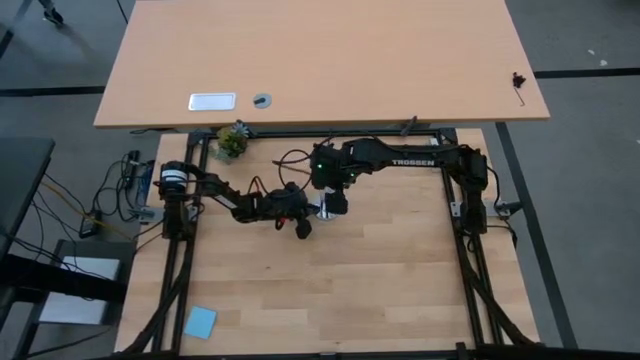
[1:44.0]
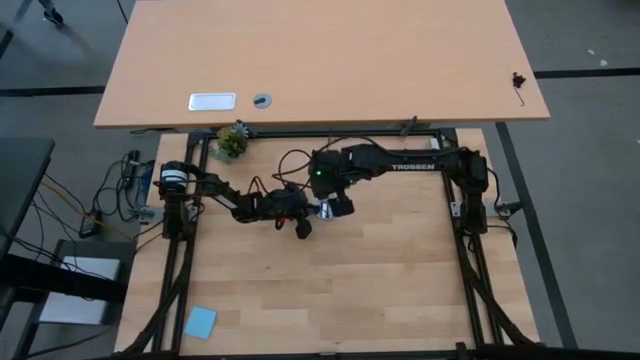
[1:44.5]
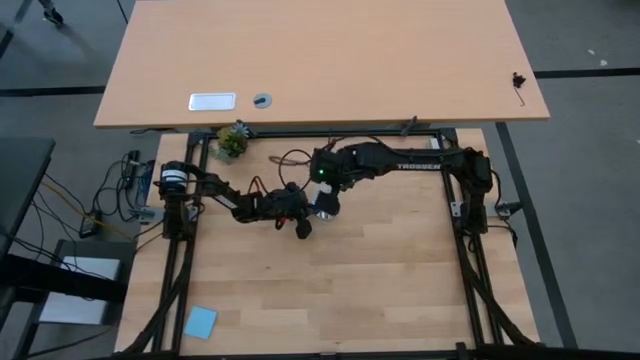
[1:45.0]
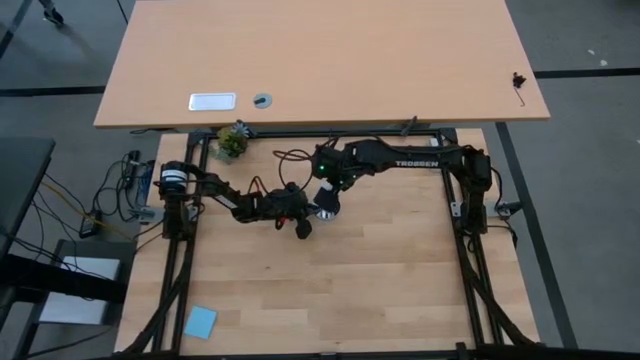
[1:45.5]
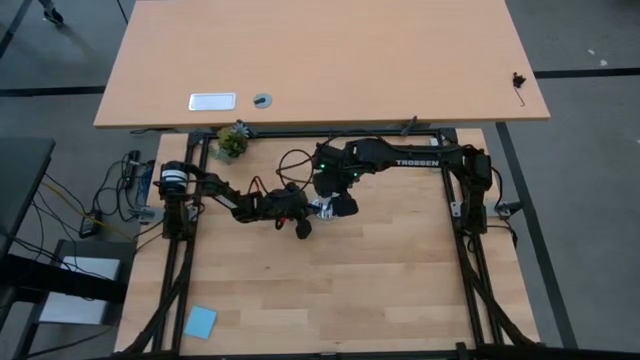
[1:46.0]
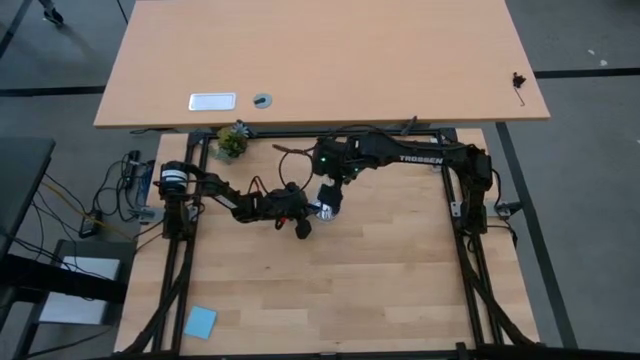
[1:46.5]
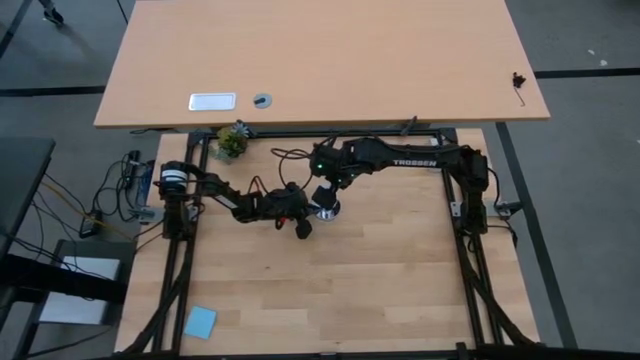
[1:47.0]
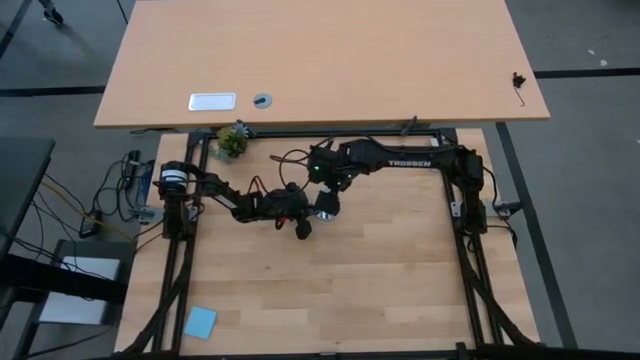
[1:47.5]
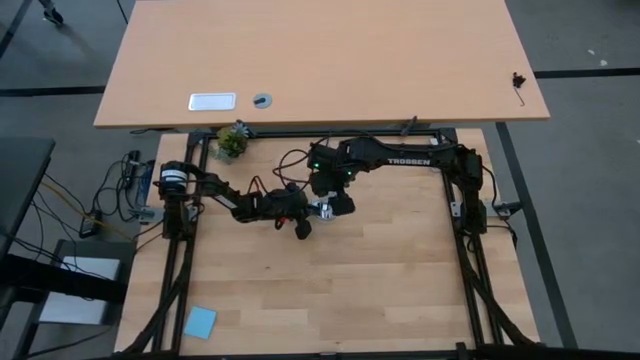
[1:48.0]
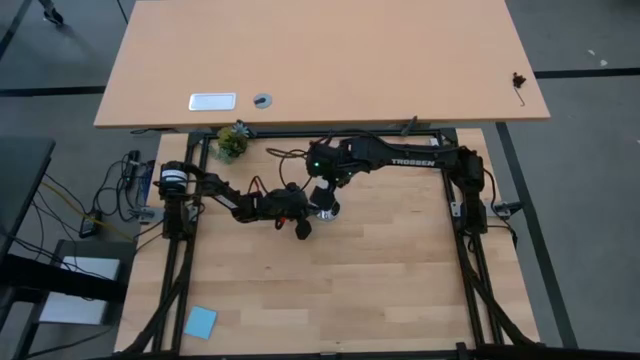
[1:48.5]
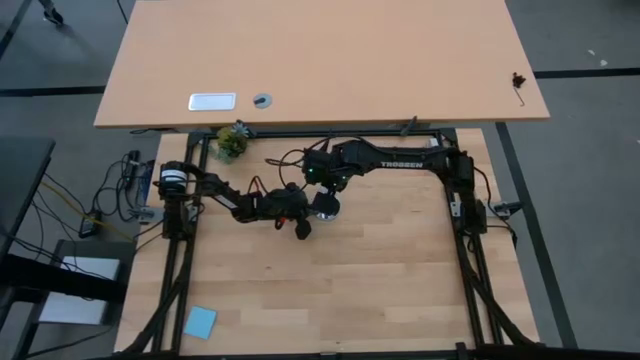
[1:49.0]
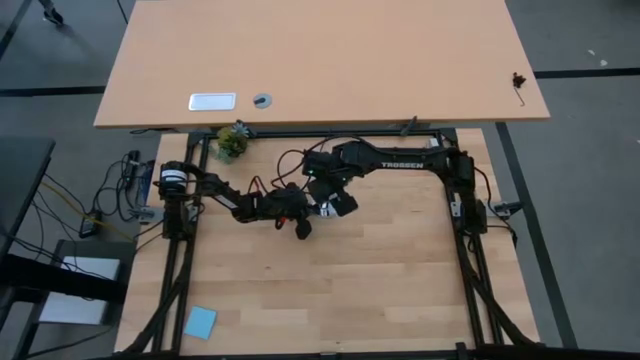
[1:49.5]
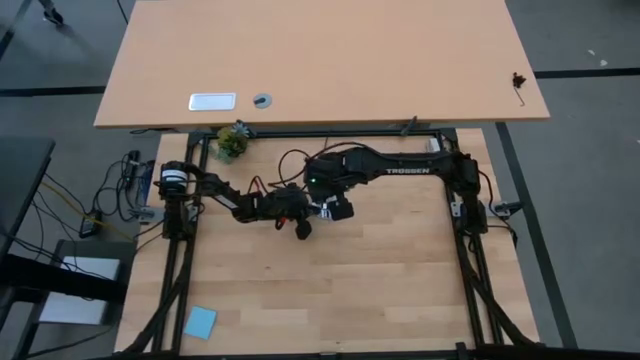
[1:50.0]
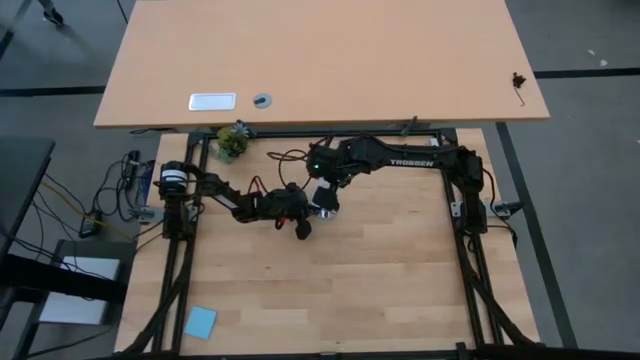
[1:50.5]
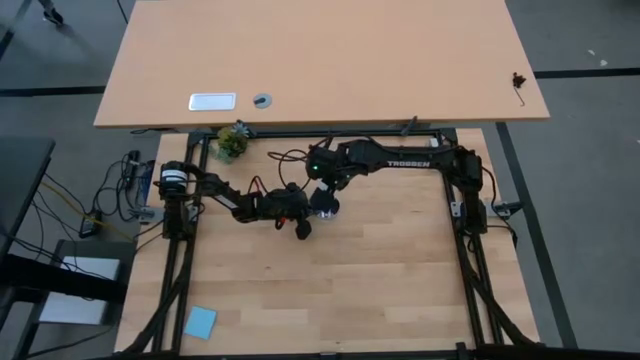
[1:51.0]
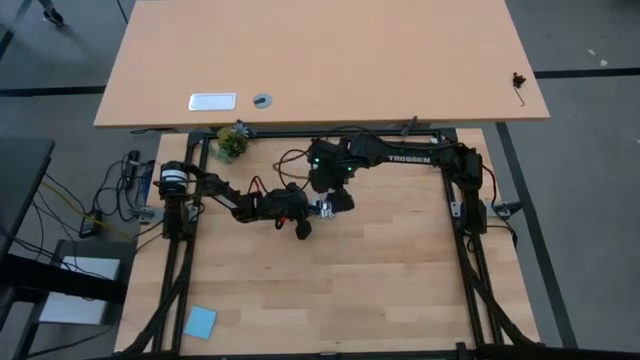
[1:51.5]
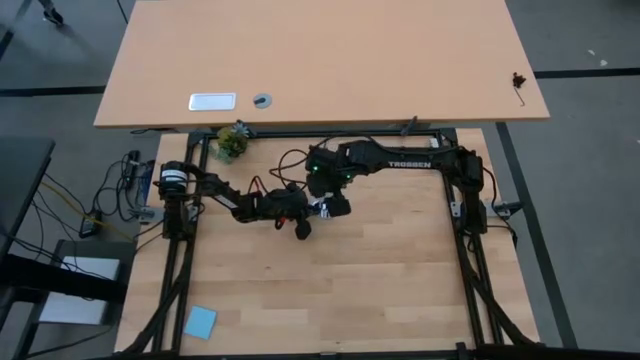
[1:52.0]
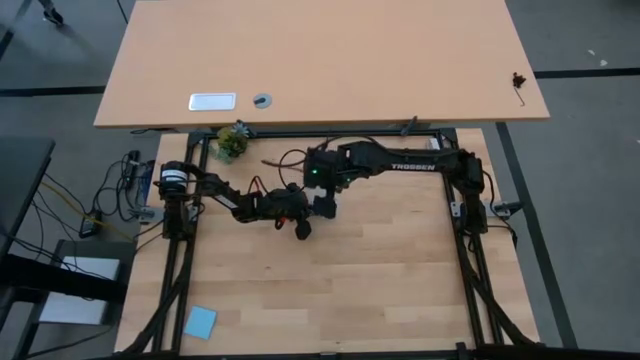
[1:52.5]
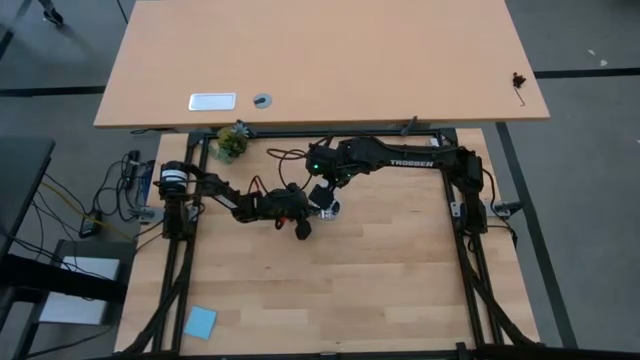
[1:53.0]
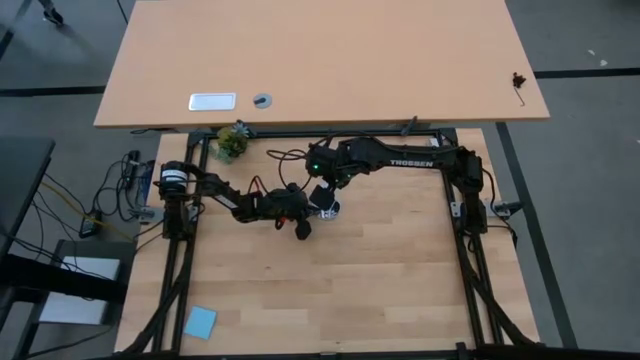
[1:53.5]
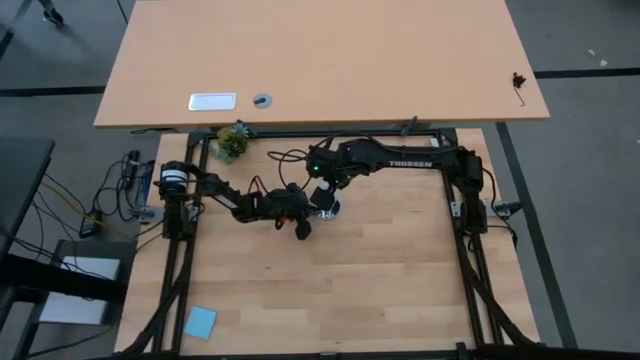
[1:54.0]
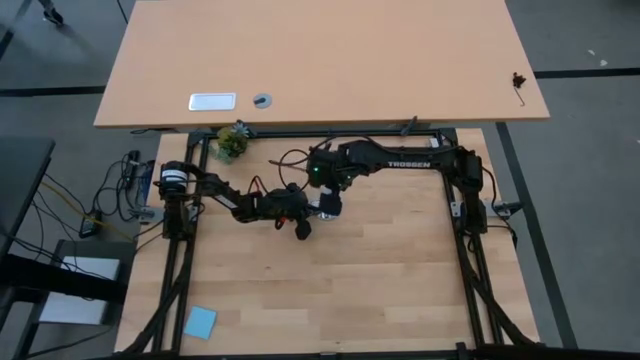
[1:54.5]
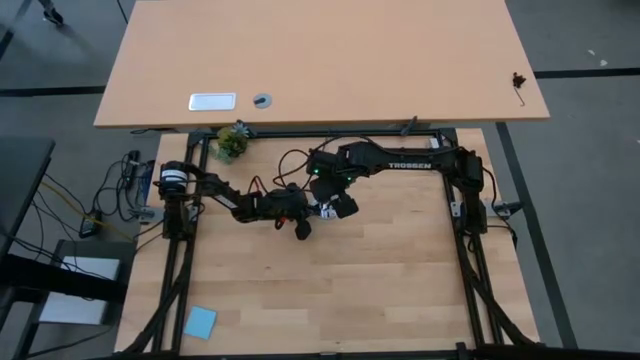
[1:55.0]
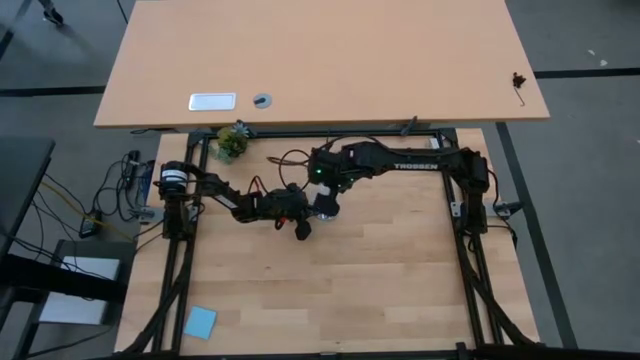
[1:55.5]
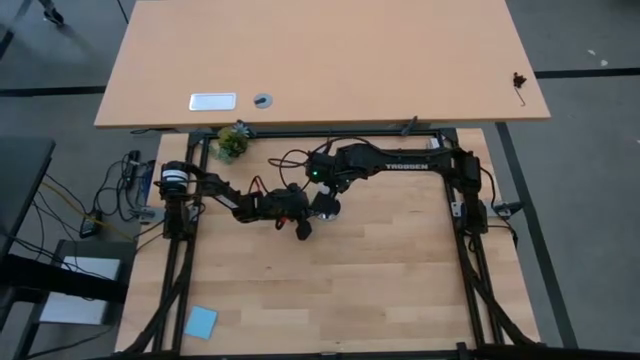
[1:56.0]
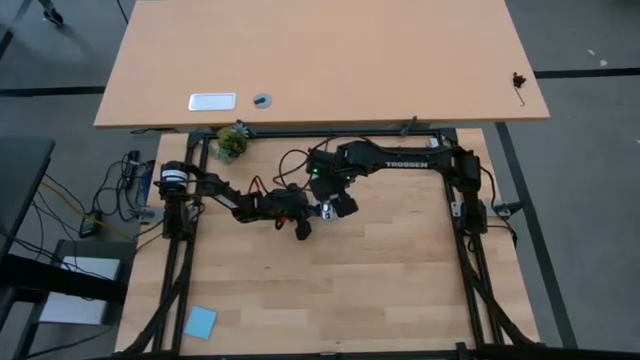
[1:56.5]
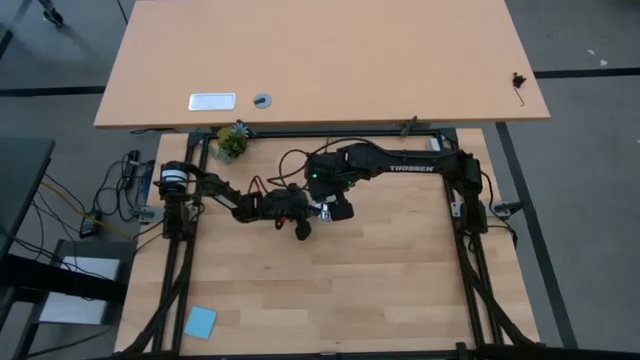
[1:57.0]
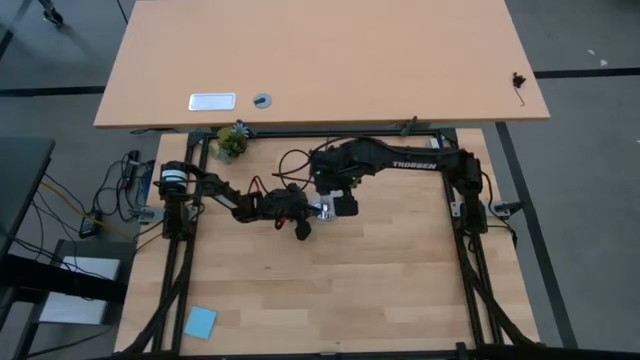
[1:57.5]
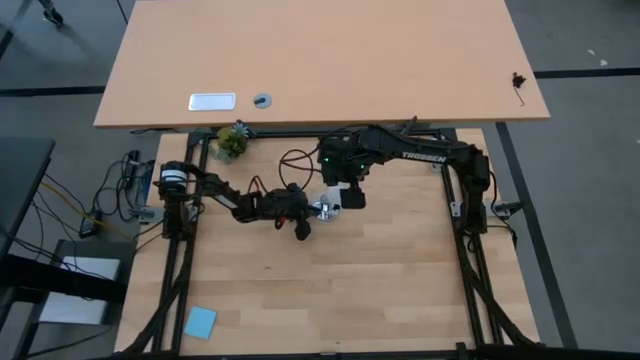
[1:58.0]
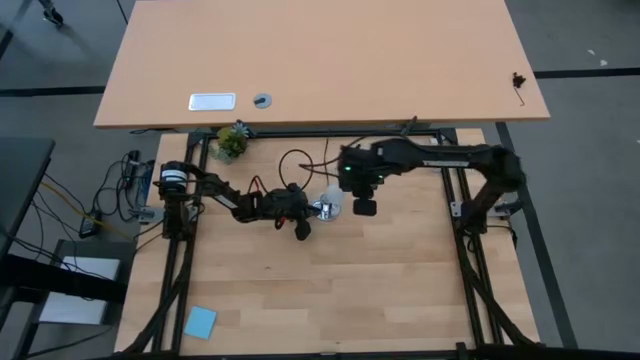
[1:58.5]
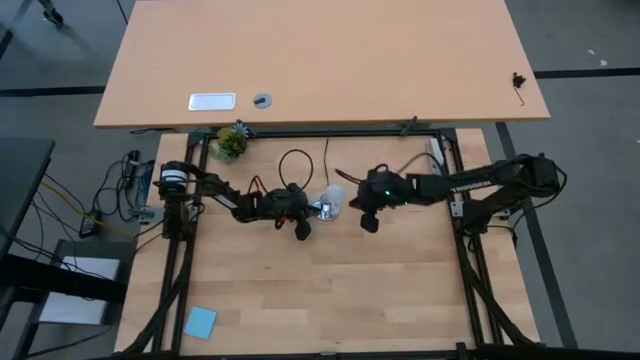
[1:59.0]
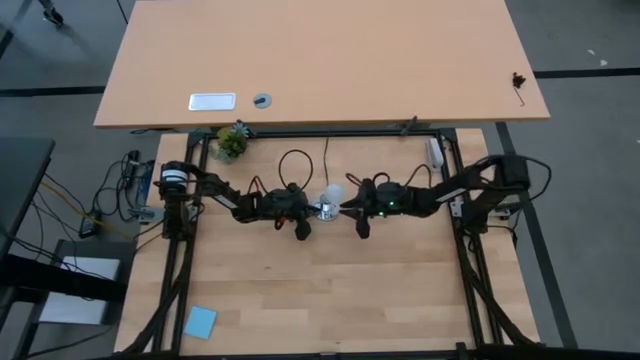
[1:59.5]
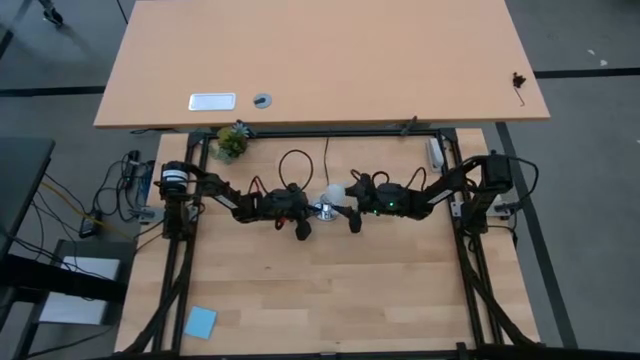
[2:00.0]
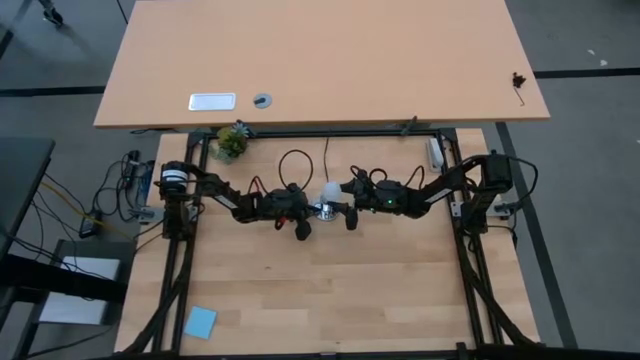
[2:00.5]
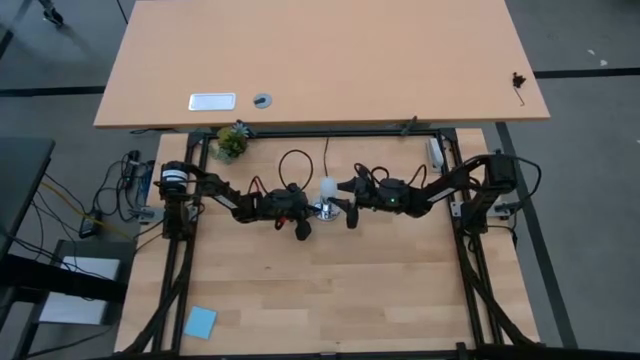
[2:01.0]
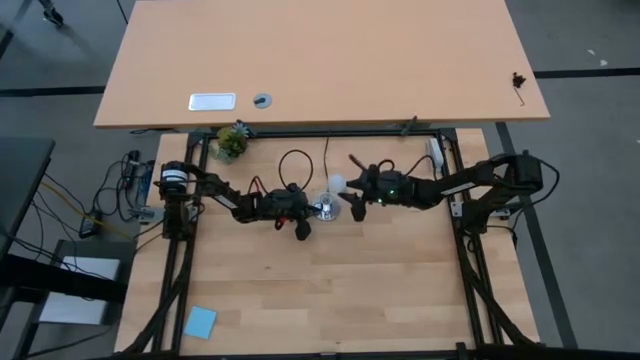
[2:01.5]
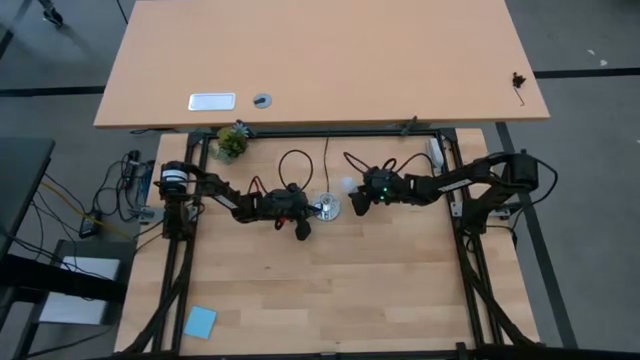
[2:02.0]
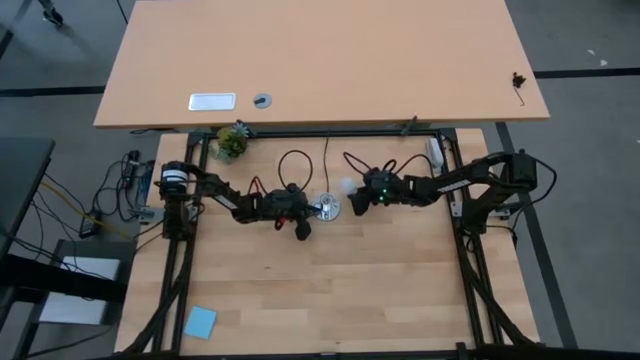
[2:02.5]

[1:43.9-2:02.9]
Task: Screw lightbulb
Remove the lightbulb from the lamp
